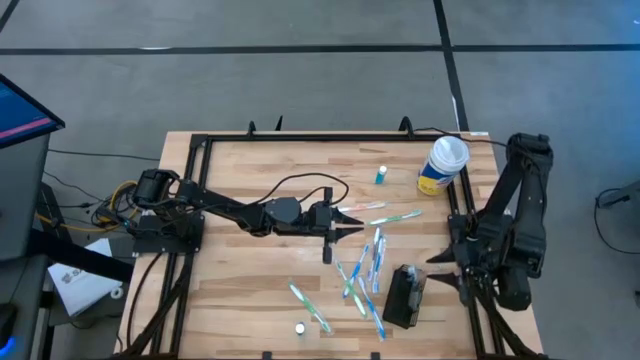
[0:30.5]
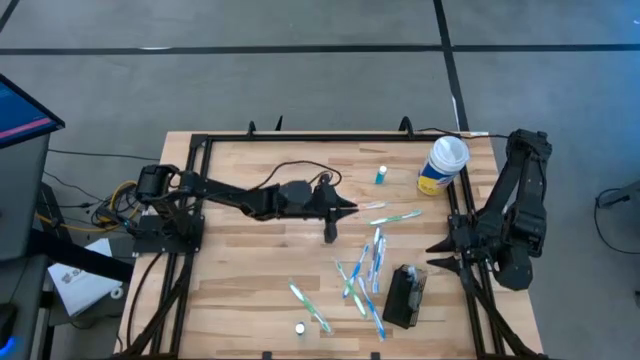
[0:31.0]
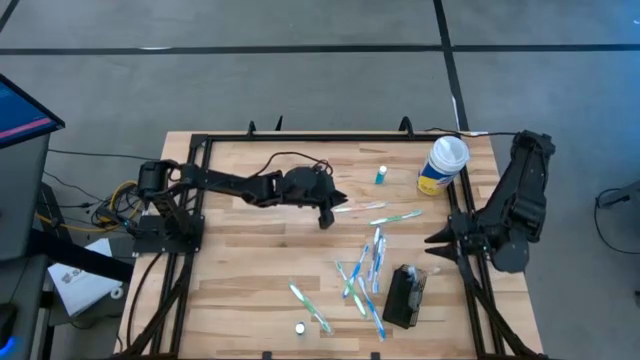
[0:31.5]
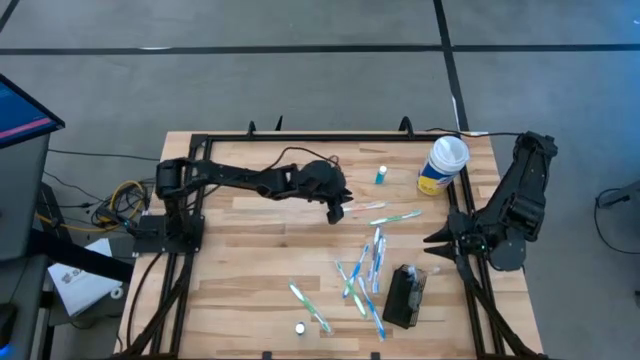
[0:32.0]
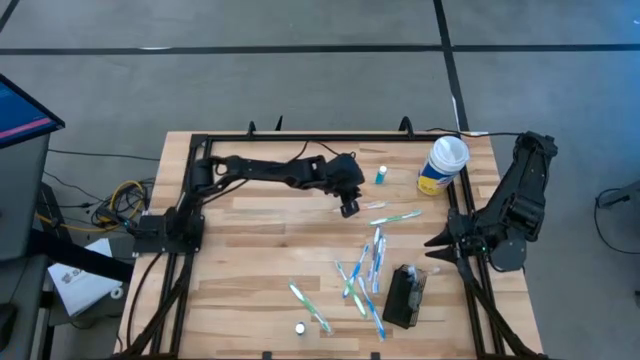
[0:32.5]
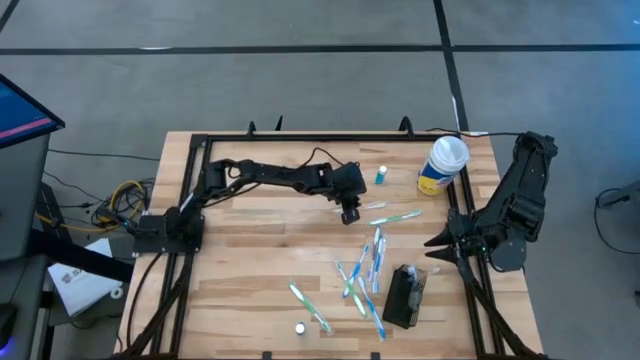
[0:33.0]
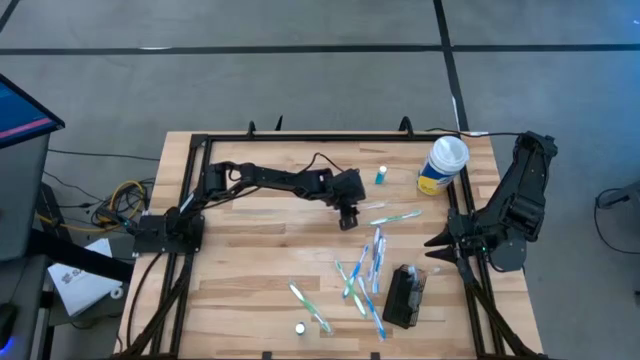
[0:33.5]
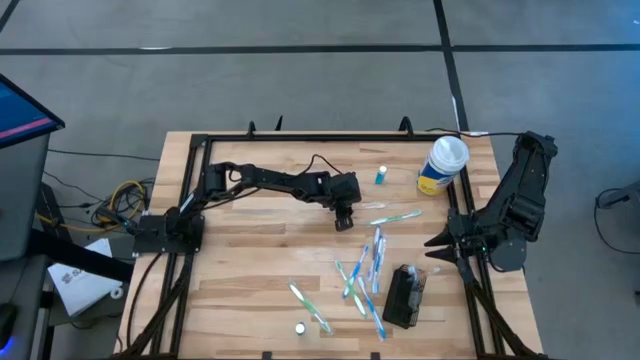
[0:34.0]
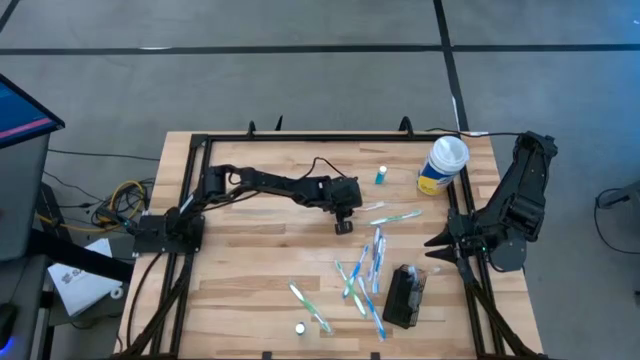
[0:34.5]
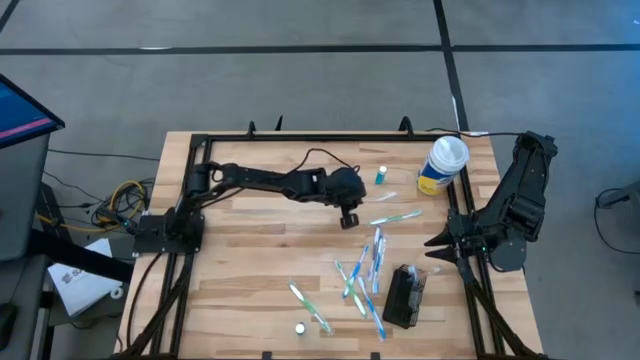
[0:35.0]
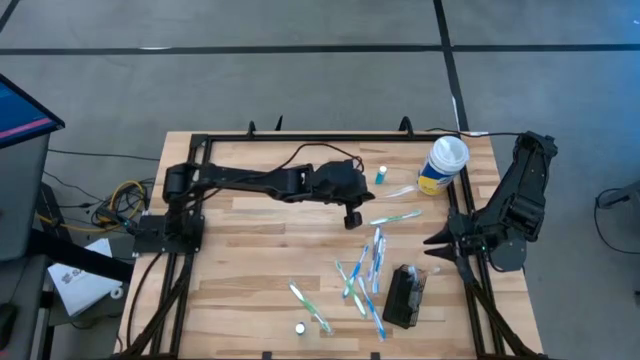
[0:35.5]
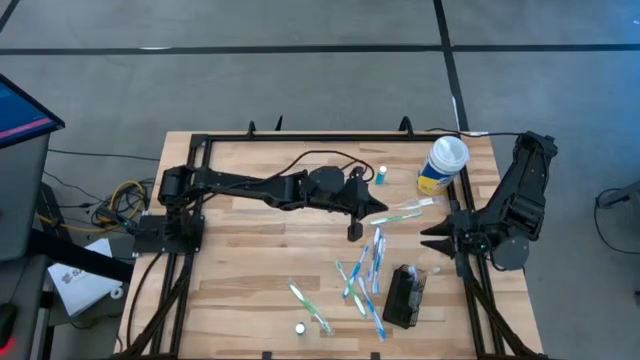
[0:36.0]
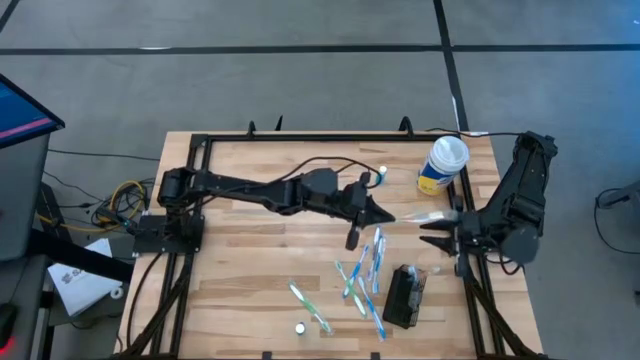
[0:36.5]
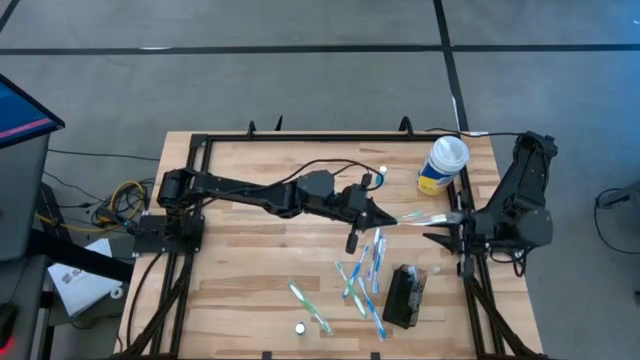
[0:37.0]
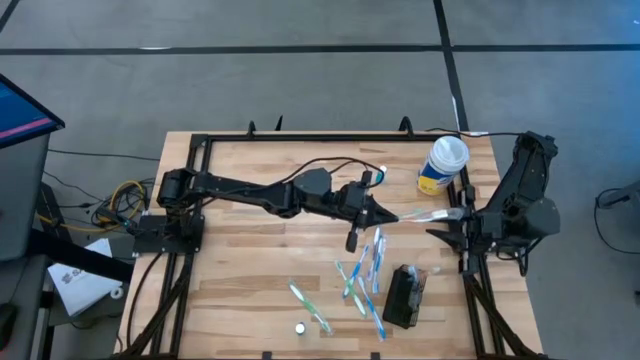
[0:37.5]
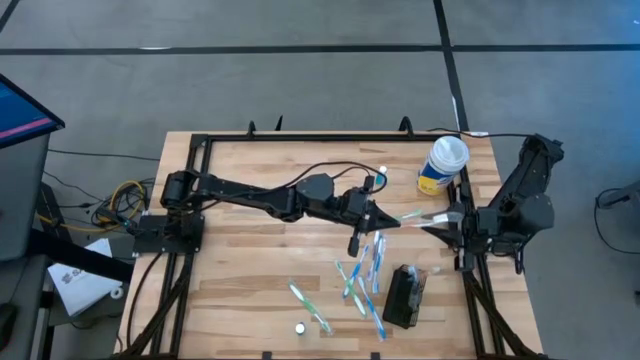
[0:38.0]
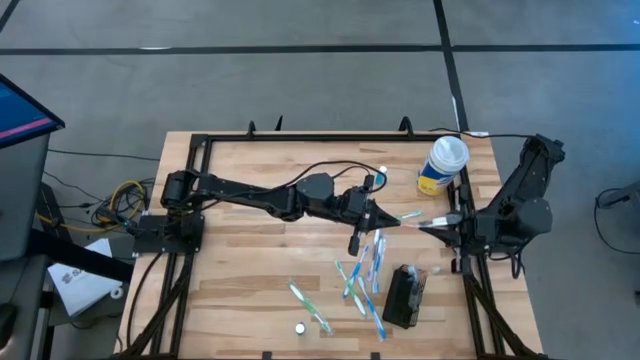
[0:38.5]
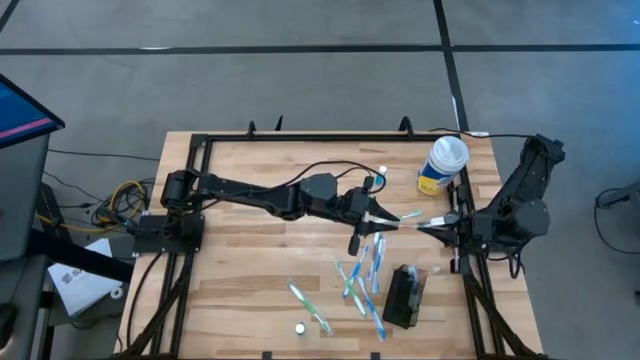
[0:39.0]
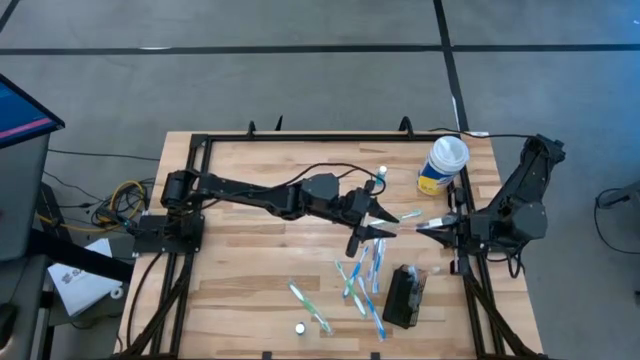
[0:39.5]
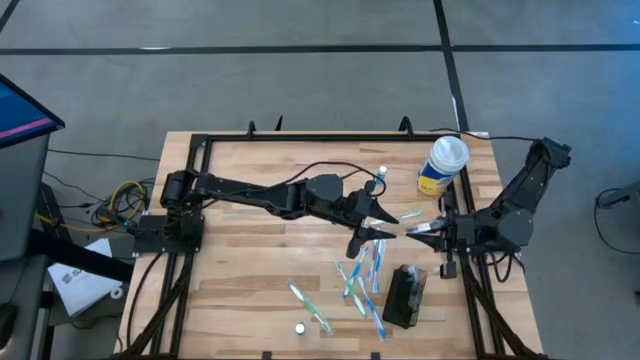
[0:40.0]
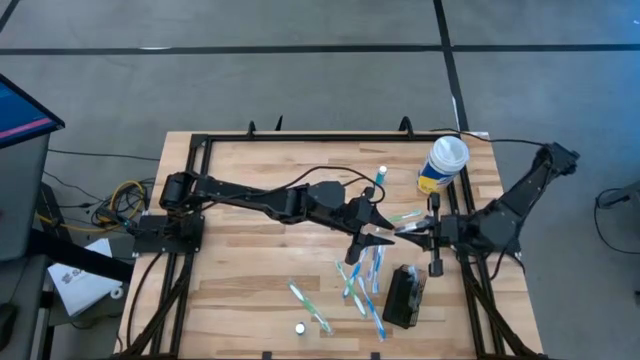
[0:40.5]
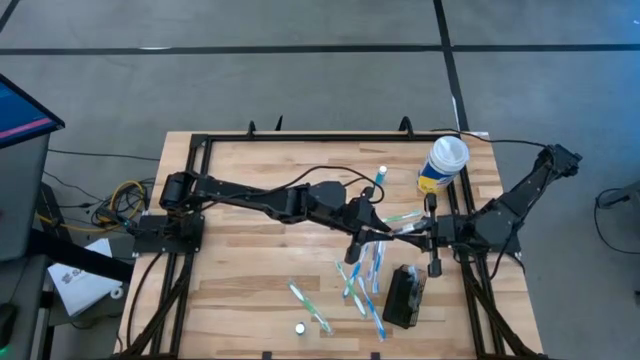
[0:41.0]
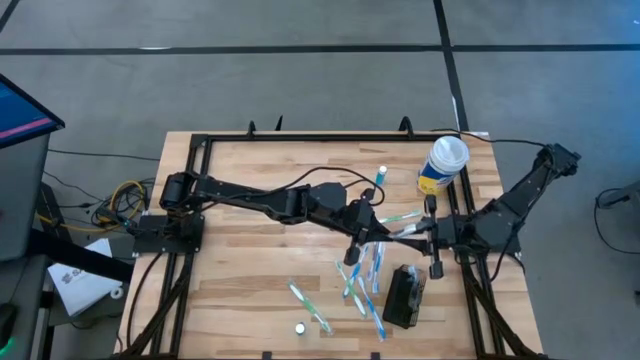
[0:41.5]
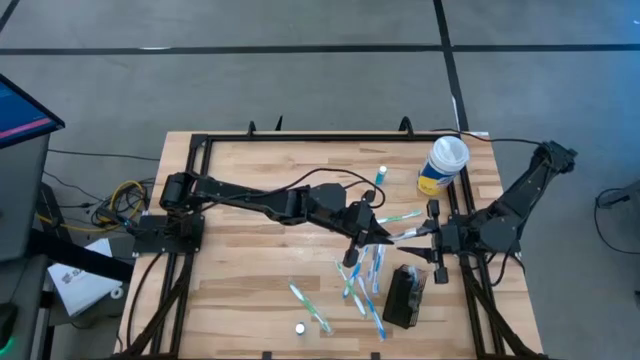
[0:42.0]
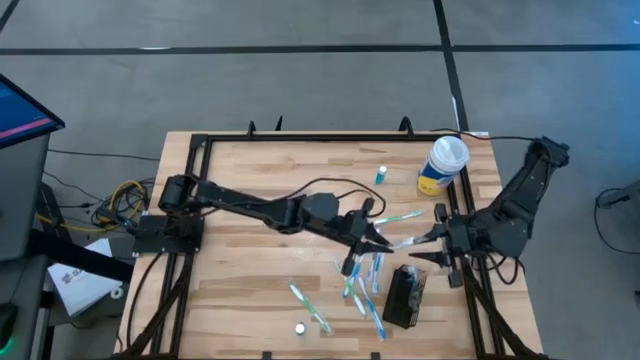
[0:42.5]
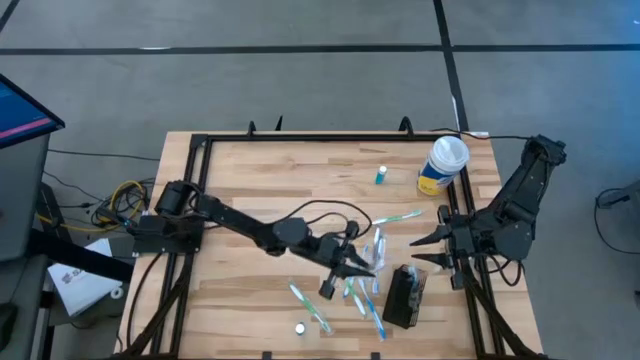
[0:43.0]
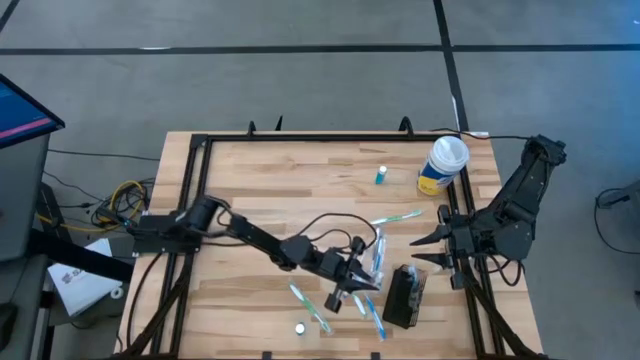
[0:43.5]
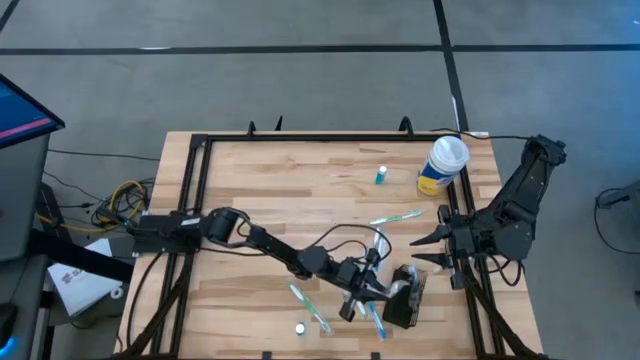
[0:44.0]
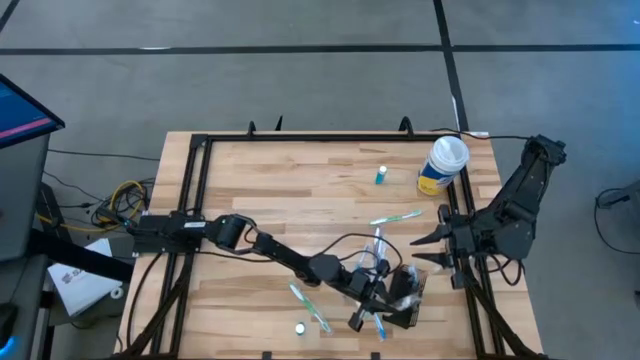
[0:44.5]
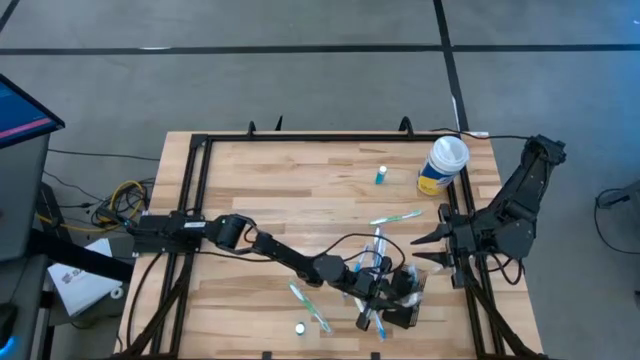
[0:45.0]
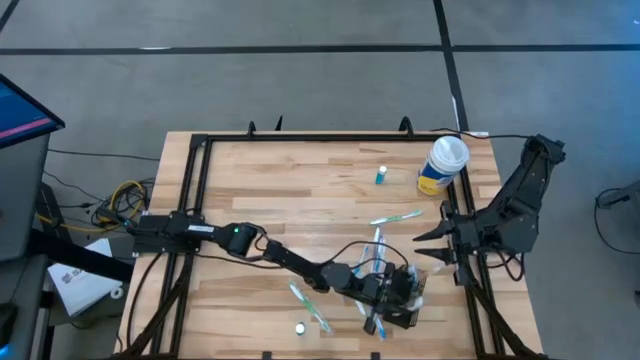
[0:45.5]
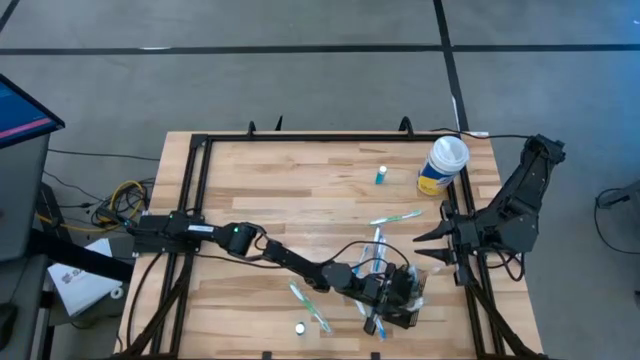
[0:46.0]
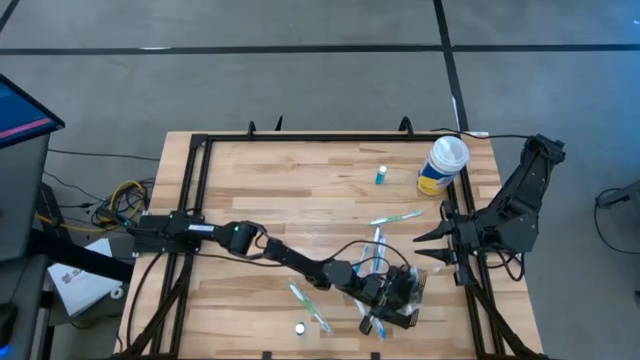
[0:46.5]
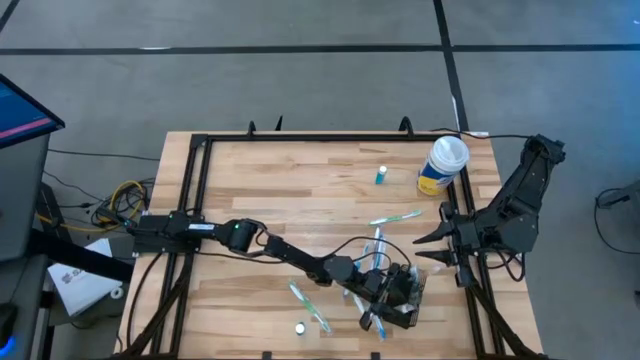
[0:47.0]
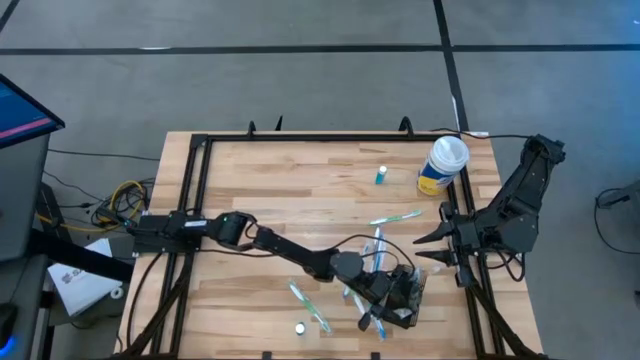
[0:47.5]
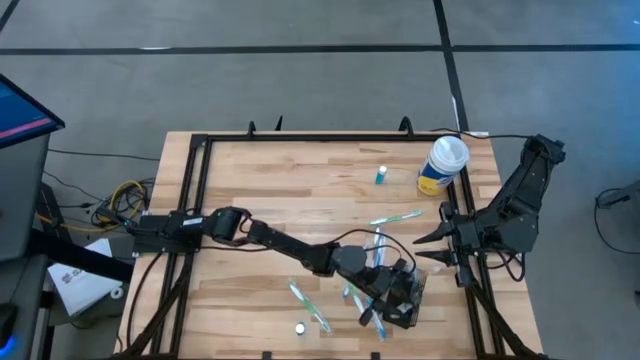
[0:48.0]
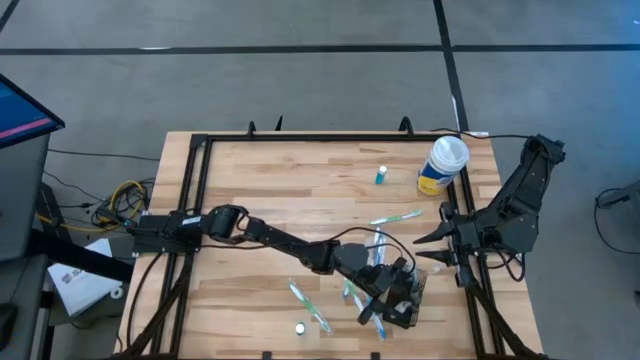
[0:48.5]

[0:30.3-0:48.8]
Task: Pick & Place toothbrushing station
Put the orange toothbrush into the black wire organizer

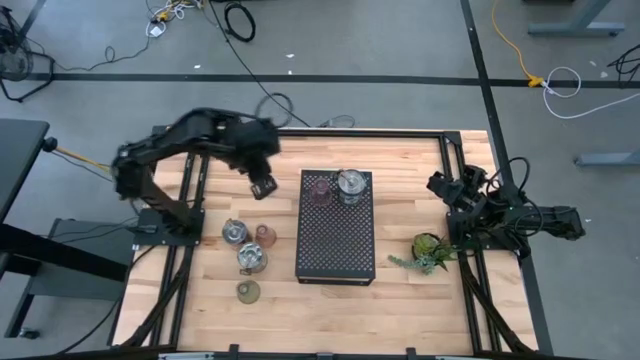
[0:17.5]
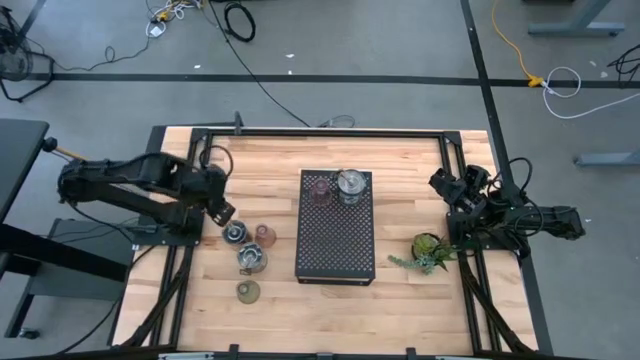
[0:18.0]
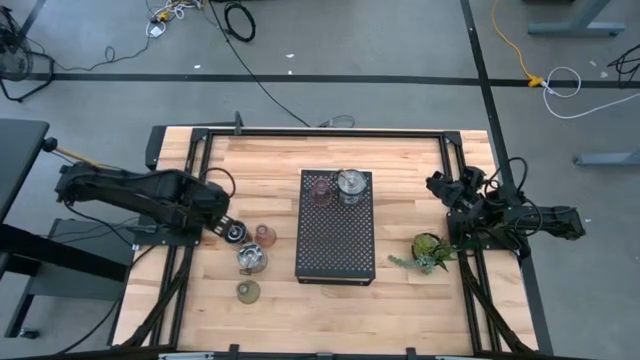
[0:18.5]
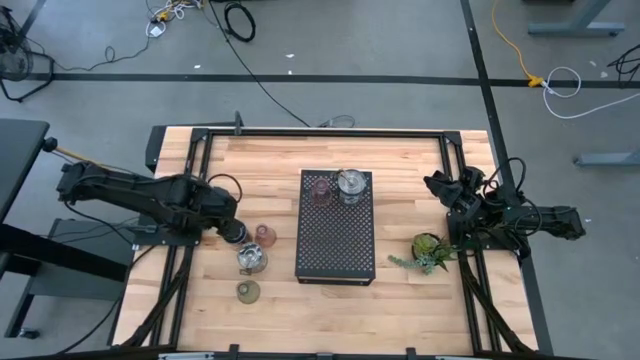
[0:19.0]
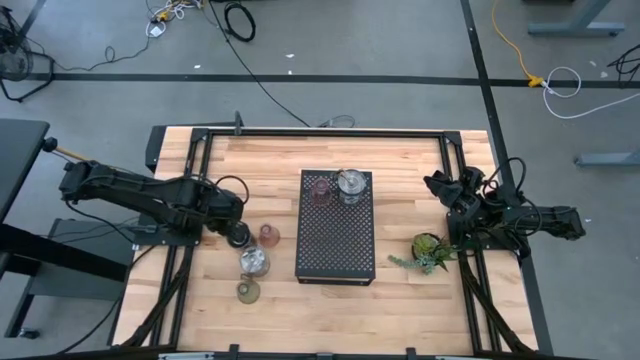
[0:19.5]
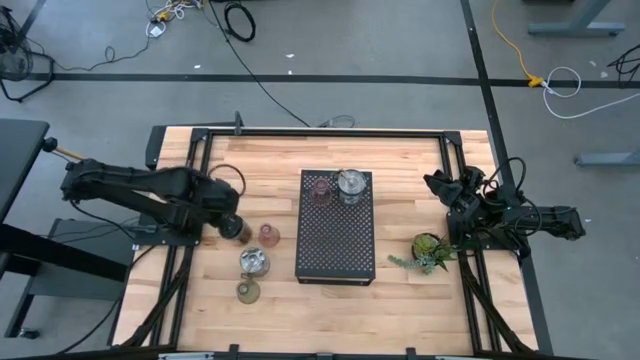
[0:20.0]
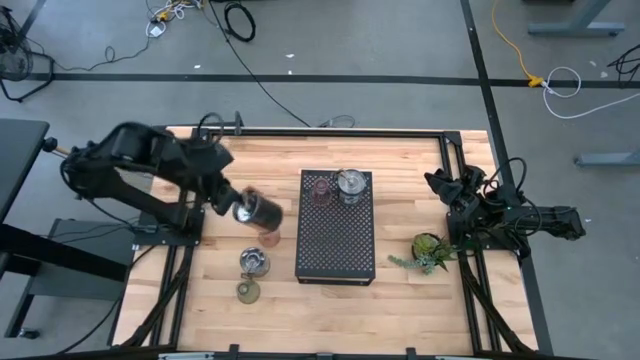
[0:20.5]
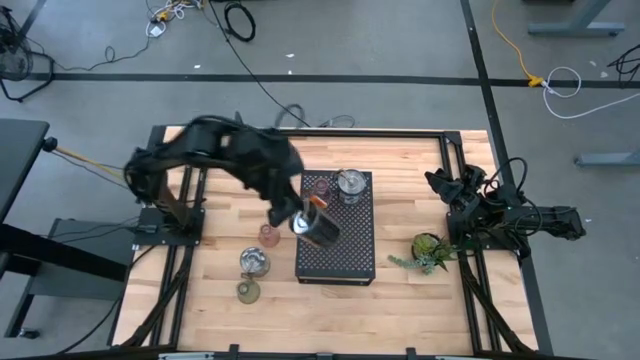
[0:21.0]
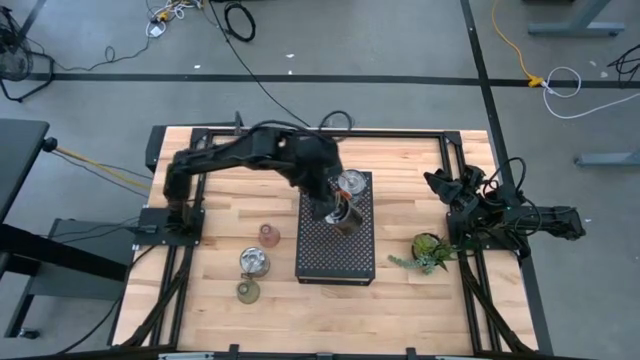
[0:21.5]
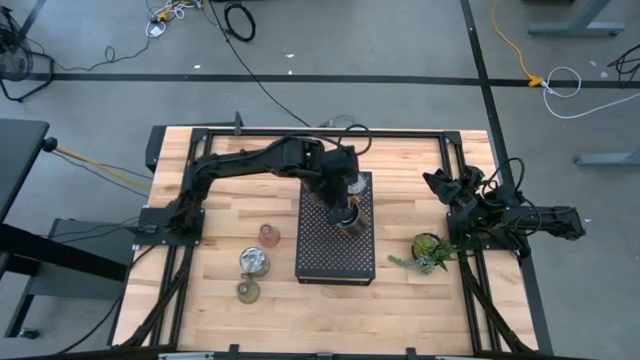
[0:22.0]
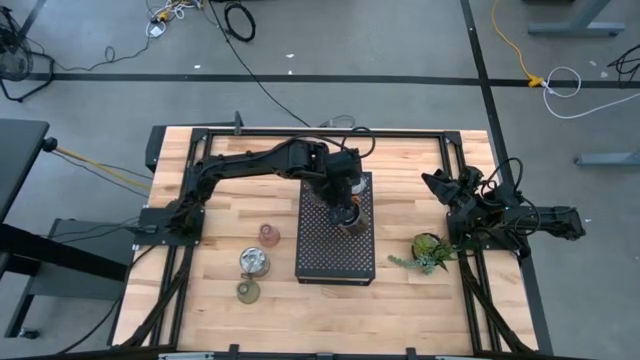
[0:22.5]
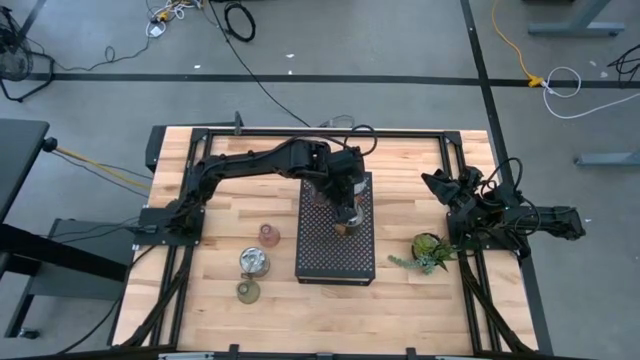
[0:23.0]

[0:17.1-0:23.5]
Task: Pick & Place candle stick holders
Put the top silver scented candle on the shelf
